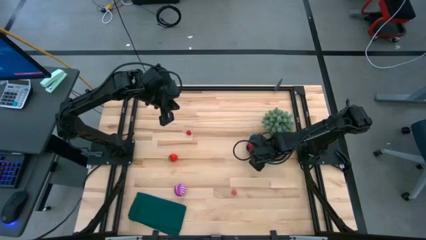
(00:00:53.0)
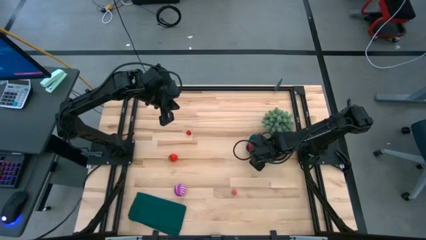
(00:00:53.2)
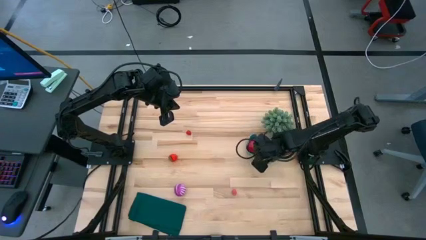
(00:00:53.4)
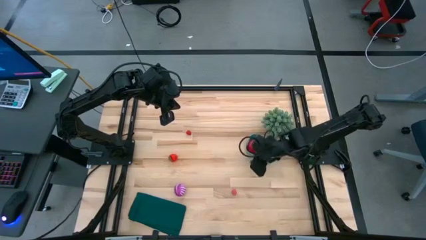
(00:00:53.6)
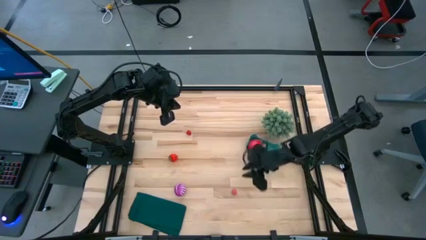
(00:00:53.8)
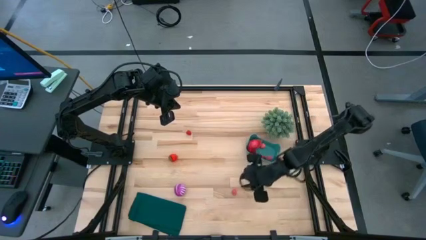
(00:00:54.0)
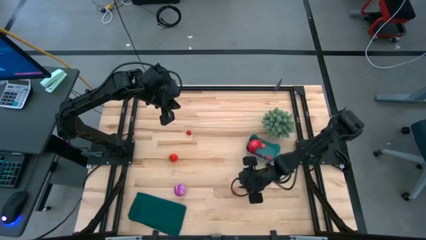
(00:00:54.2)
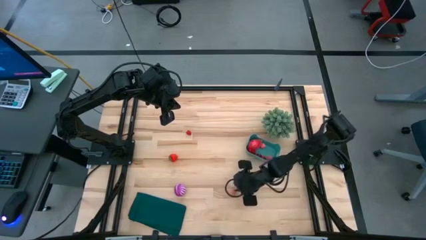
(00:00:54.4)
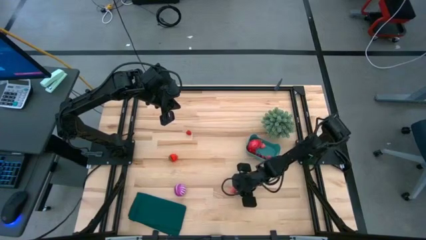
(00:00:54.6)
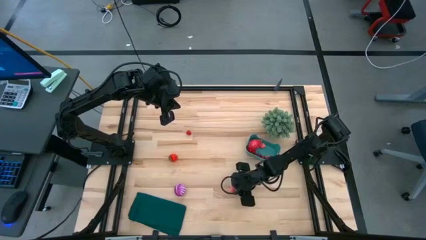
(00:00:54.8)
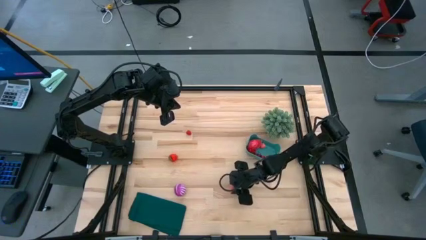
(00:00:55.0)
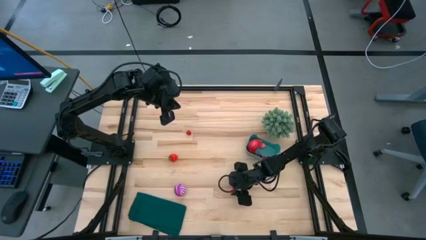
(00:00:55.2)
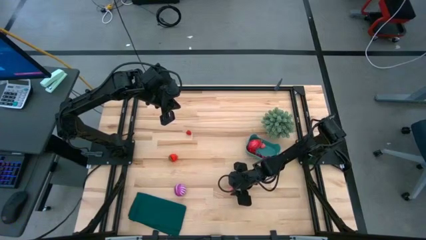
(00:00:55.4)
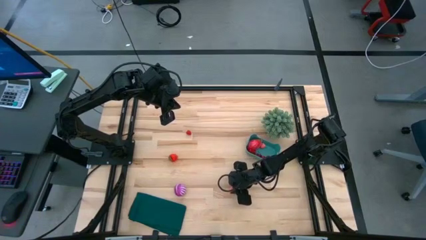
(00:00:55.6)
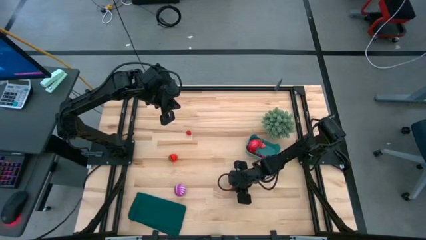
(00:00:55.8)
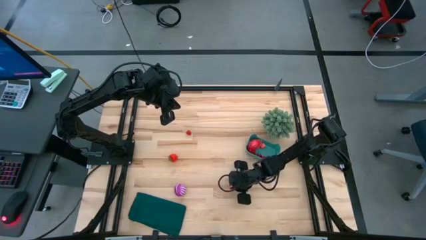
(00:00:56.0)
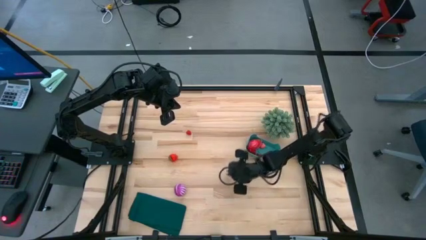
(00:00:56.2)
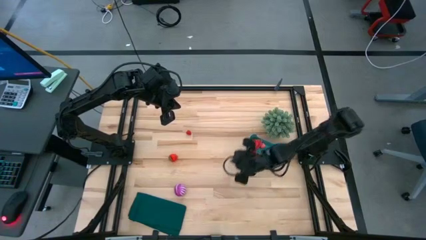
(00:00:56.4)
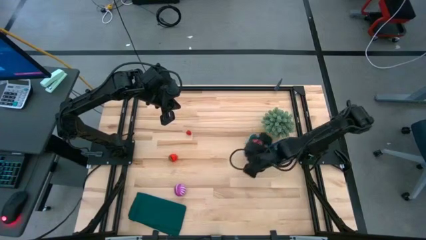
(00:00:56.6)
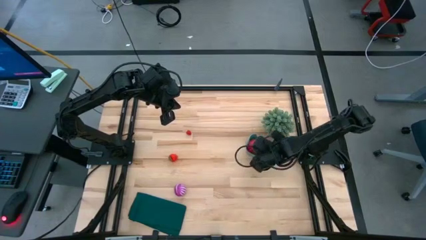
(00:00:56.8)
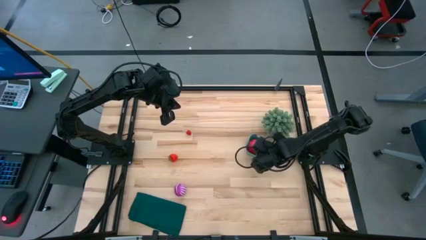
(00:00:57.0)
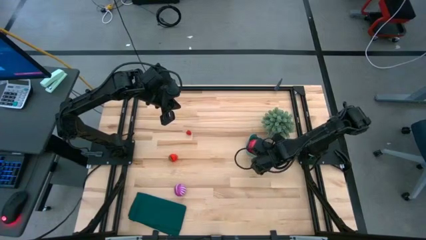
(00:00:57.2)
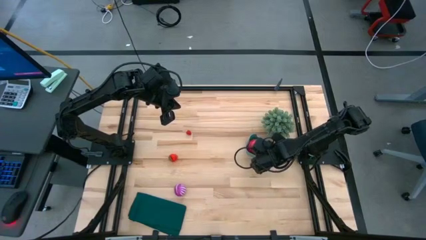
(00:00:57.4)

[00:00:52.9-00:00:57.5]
Task: Pick and placing Produce into tupperware
Put the peach into the green bin

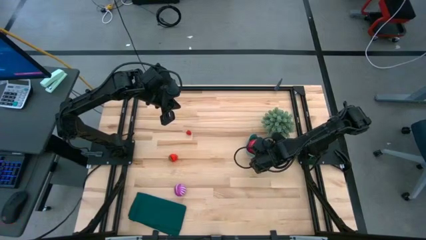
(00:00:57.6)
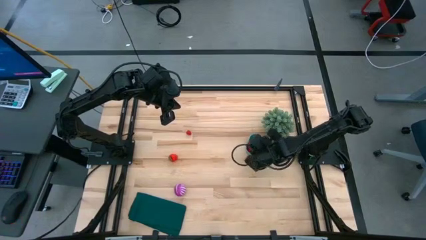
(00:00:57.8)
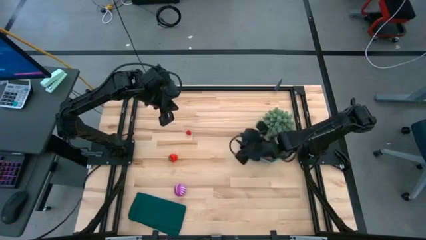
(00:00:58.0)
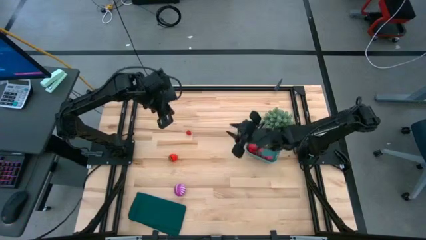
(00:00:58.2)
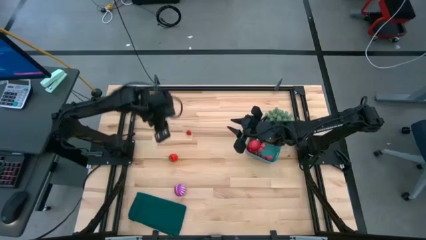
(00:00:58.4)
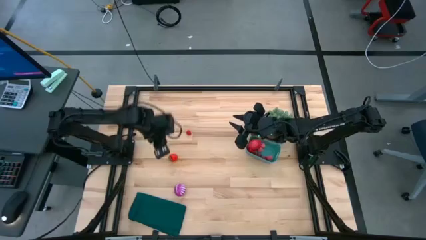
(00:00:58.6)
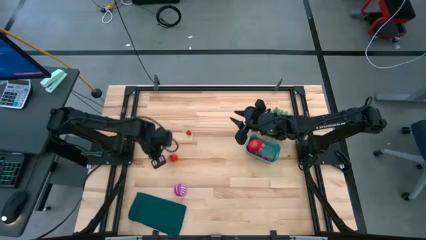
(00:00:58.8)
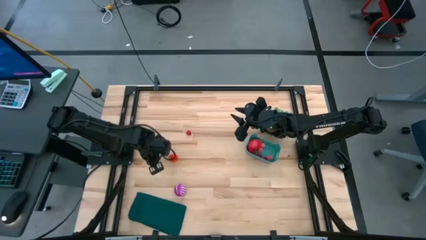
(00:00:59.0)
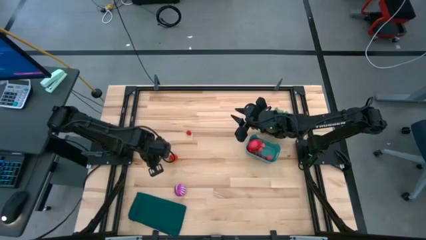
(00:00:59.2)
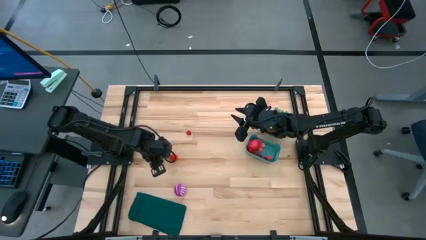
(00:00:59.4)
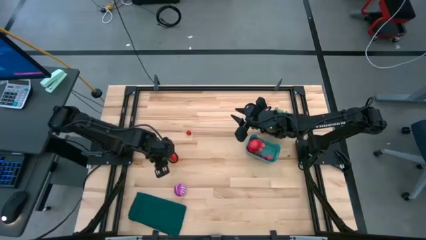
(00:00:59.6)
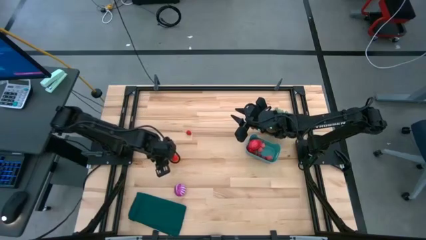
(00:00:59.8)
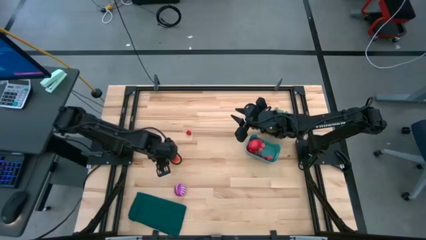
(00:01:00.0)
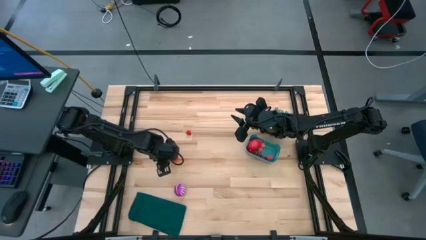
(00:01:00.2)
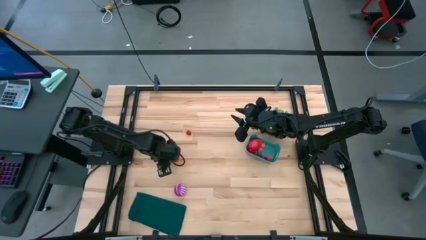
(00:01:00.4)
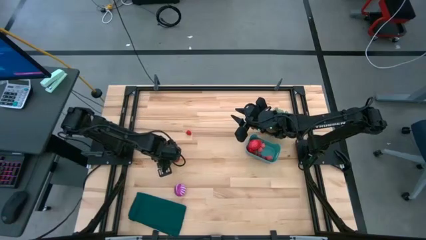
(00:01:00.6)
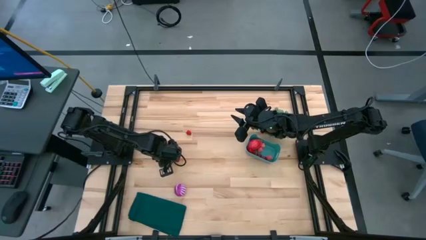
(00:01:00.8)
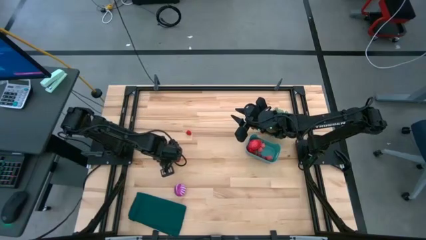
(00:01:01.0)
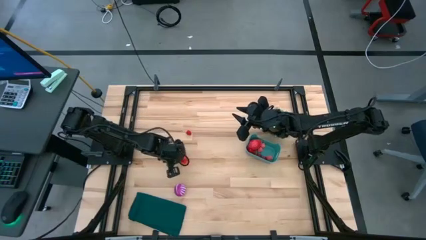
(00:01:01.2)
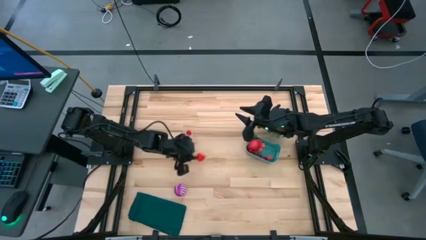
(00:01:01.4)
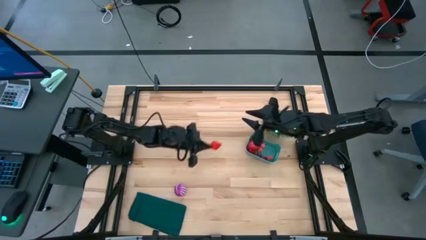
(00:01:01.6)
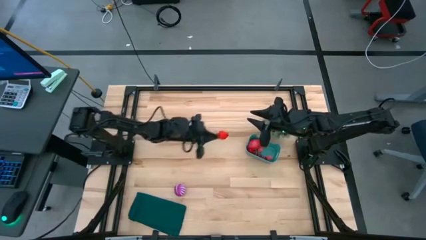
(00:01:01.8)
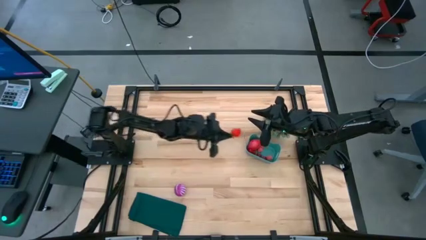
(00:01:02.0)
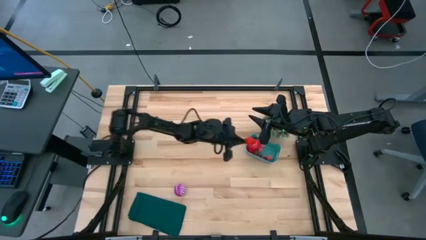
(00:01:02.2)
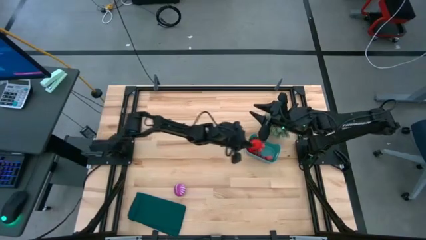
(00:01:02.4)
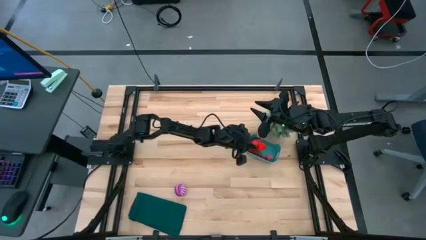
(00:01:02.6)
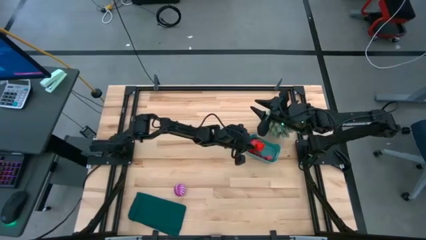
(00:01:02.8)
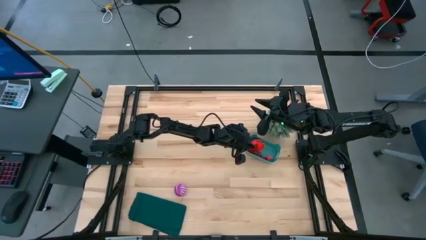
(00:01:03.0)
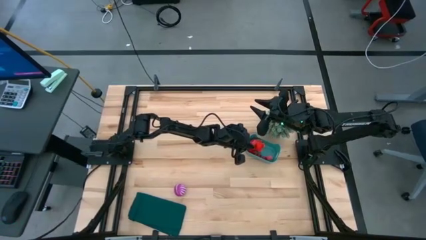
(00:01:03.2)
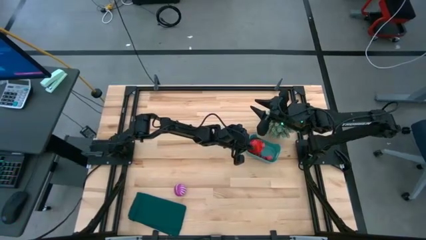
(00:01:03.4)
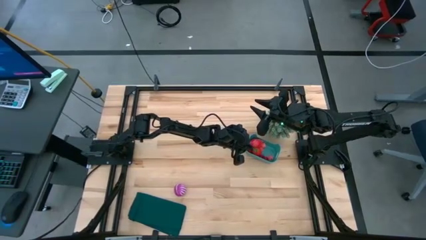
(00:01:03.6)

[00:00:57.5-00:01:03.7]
Put the strawberry into the green bin

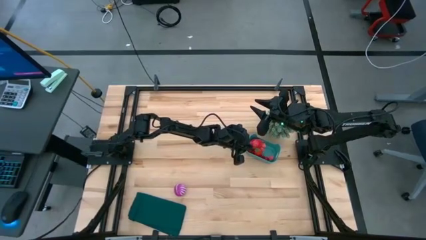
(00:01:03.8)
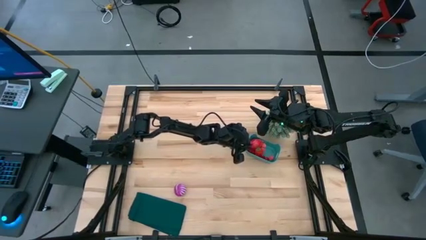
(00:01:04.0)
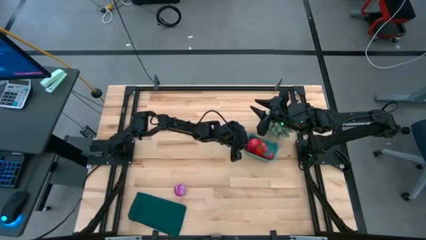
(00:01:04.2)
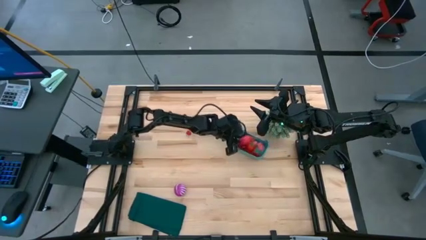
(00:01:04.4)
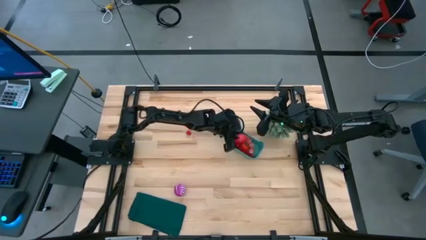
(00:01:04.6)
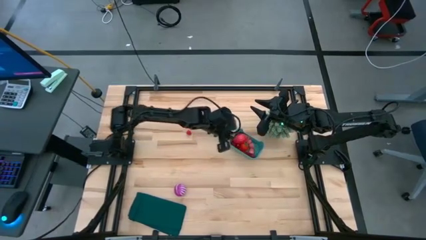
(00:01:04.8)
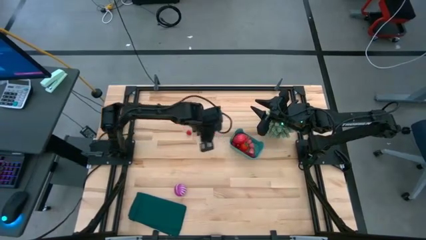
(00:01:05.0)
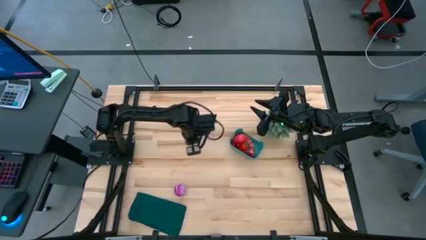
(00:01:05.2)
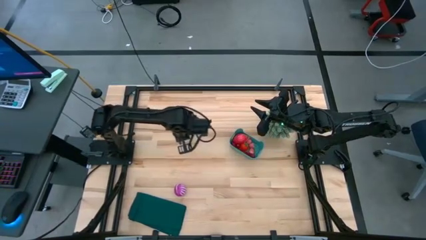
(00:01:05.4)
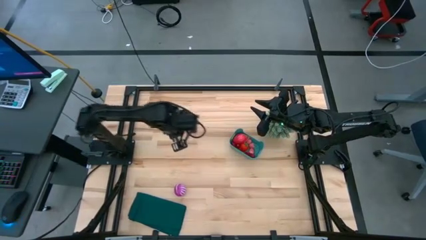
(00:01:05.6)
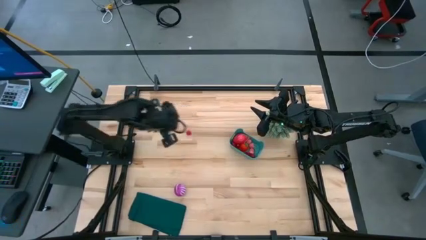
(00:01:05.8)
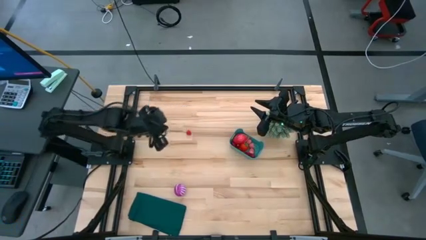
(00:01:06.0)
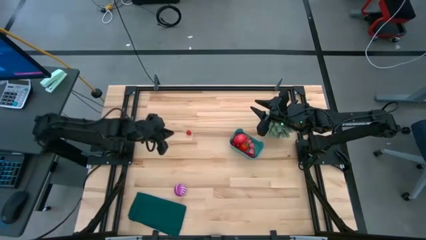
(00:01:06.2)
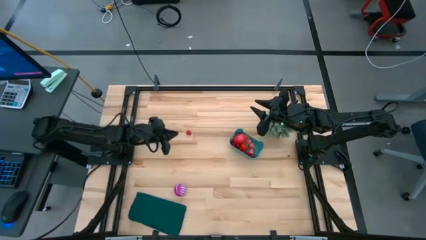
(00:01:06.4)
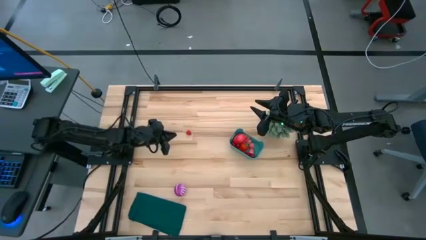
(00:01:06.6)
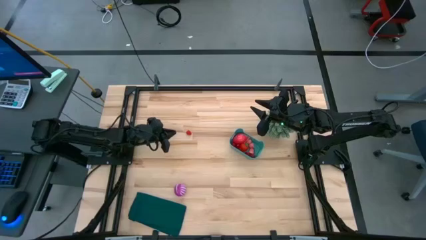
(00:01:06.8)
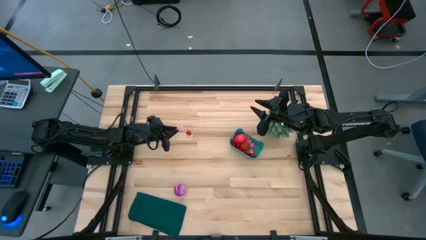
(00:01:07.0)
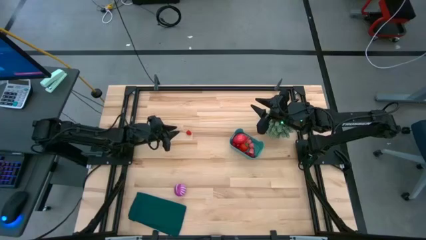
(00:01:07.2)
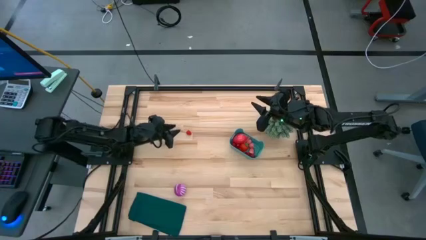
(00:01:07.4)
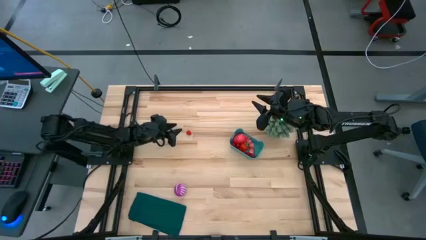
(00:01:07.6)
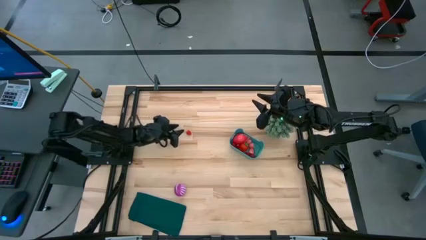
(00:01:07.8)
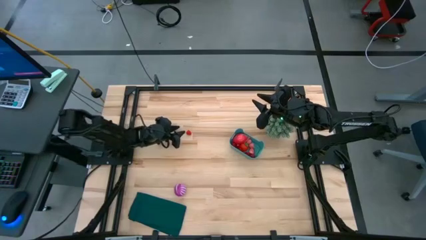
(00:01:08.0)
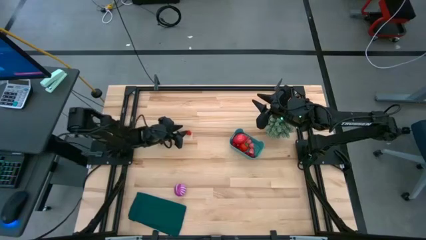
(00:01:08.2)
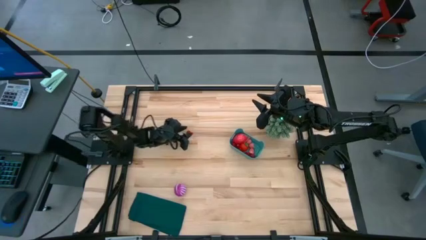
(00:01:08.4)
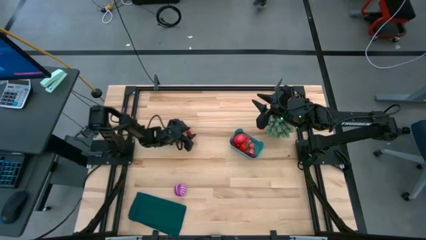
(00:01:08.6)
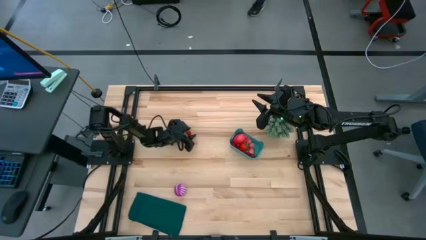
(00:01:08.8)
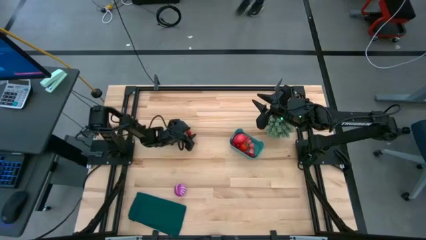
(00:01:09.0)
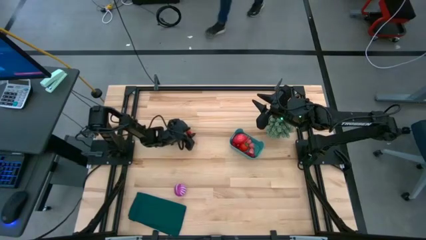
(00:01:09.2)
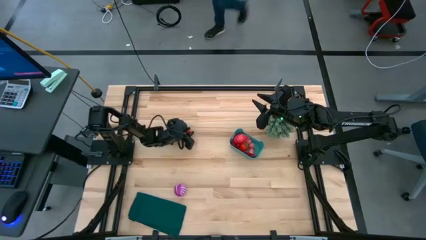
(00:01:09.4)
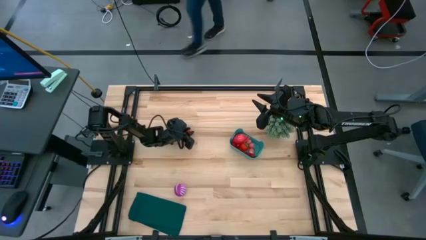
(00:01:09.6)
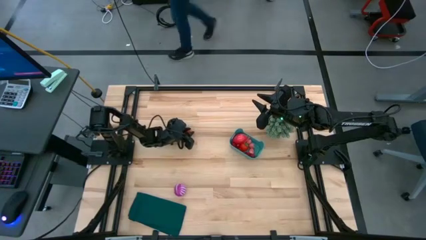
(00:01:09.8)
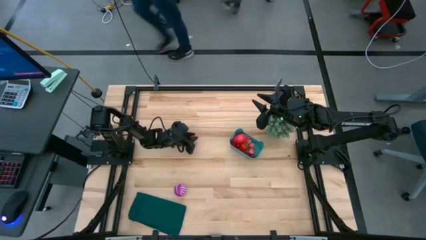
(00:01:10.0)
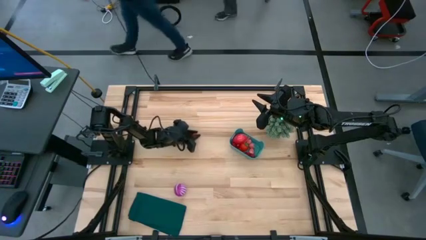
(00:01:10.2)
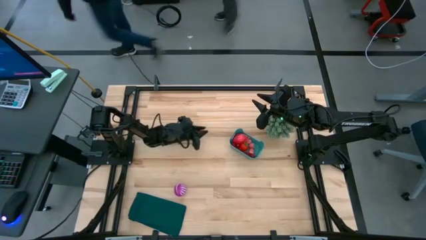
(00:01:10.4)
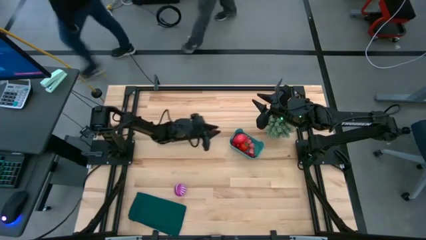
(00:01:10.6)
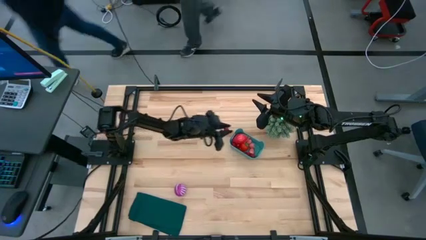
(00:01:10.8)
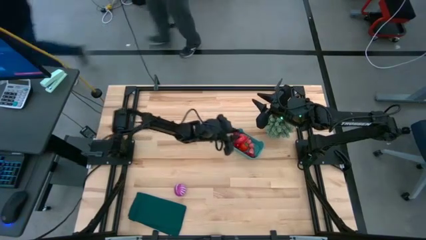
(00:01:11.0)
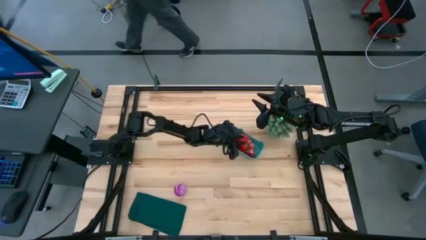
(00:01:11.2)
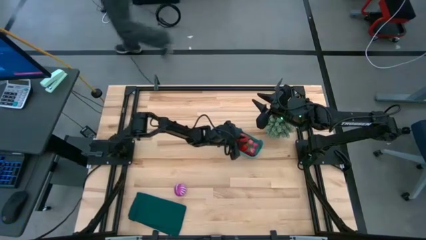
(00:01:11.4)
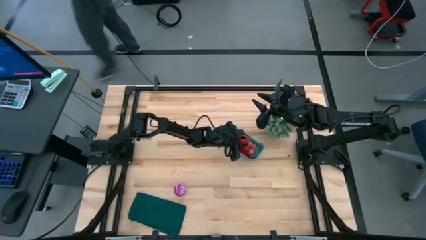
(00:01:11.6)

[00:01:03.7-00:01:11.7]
Put the raspberry into the green bin
